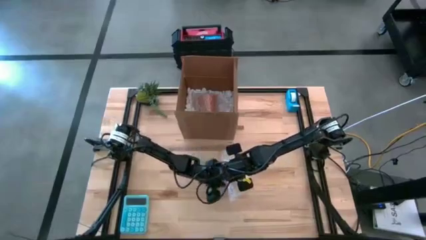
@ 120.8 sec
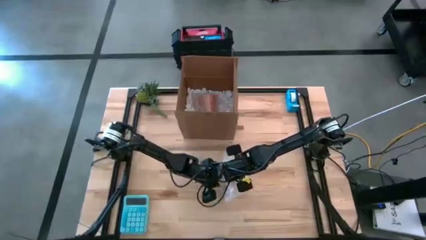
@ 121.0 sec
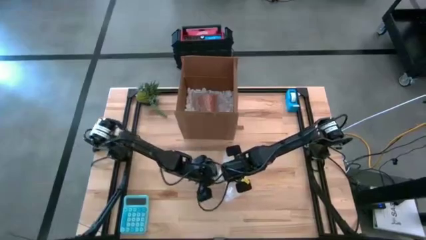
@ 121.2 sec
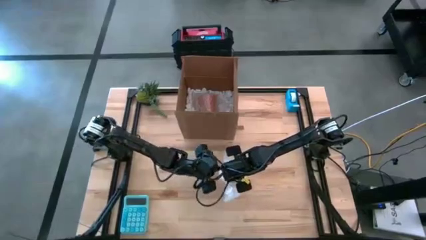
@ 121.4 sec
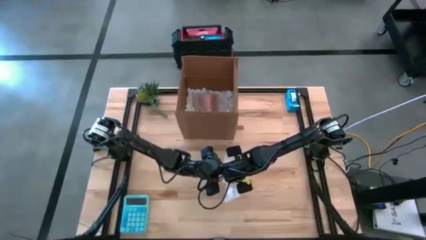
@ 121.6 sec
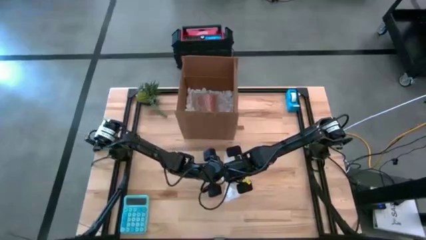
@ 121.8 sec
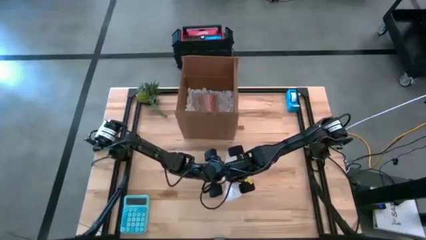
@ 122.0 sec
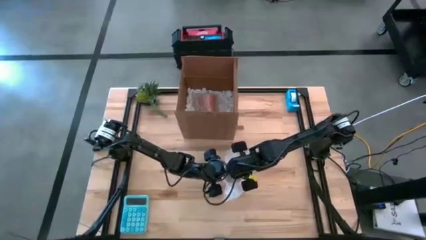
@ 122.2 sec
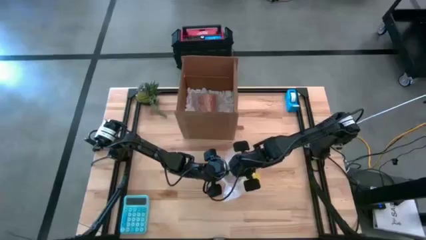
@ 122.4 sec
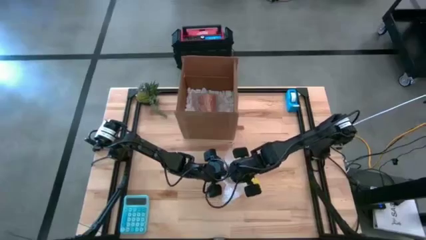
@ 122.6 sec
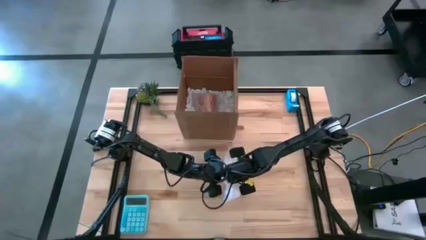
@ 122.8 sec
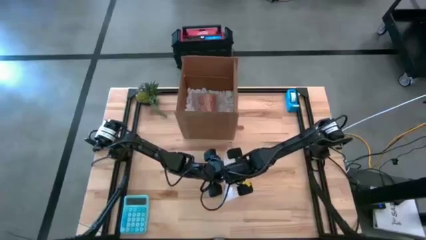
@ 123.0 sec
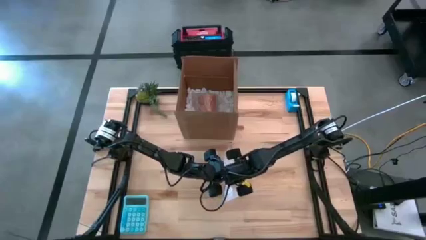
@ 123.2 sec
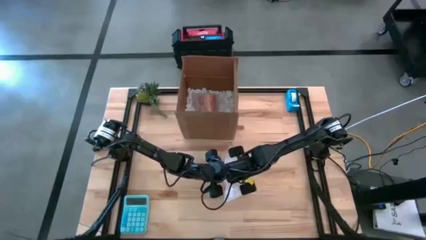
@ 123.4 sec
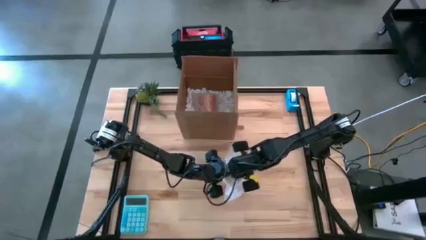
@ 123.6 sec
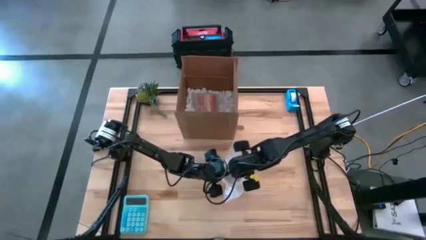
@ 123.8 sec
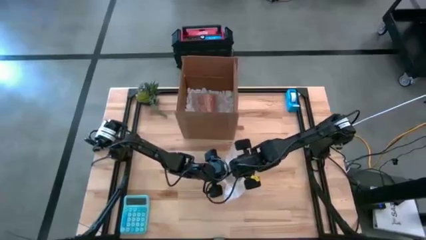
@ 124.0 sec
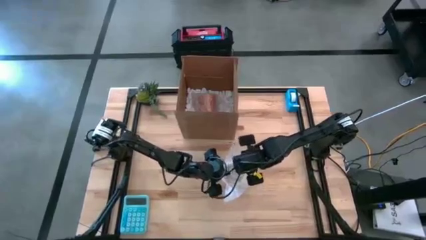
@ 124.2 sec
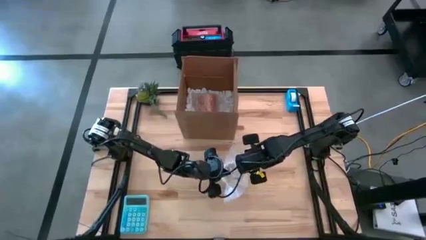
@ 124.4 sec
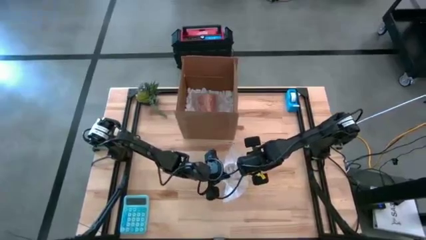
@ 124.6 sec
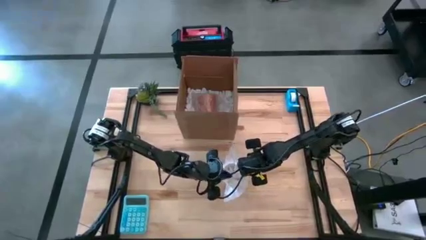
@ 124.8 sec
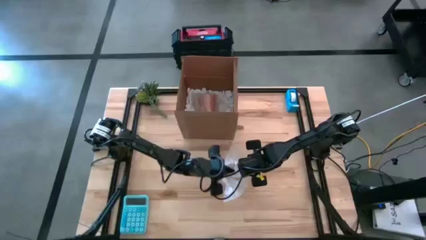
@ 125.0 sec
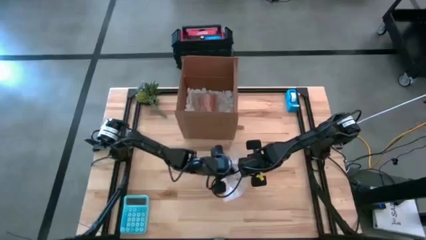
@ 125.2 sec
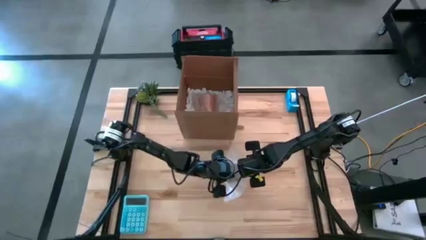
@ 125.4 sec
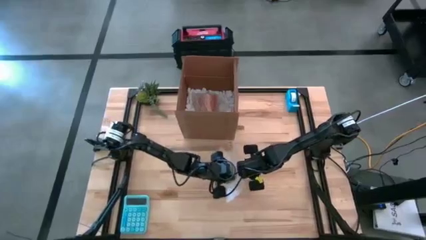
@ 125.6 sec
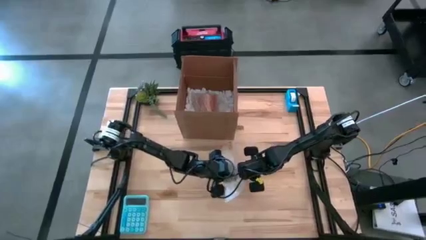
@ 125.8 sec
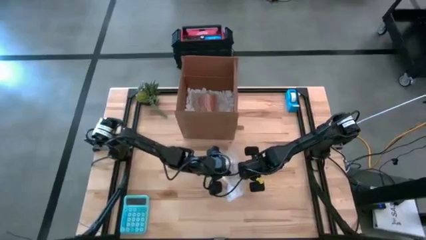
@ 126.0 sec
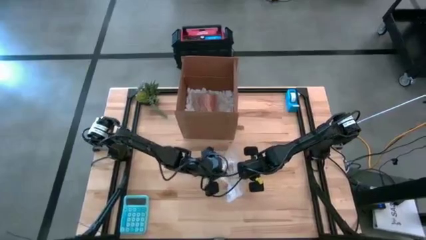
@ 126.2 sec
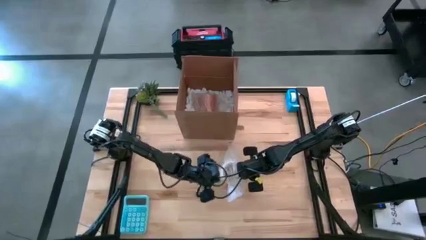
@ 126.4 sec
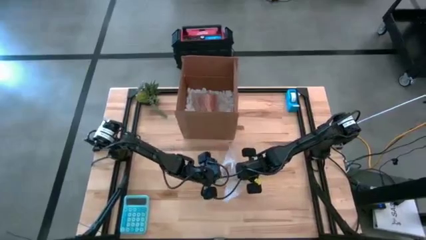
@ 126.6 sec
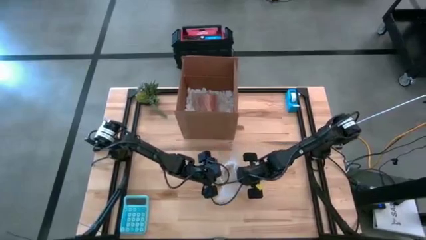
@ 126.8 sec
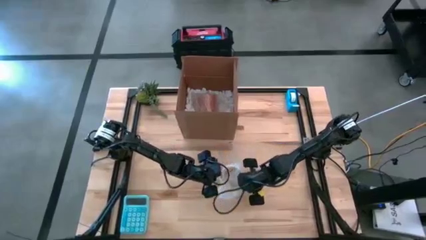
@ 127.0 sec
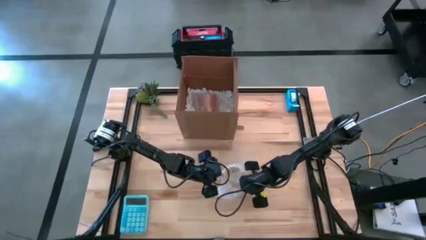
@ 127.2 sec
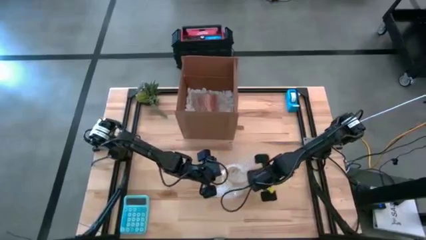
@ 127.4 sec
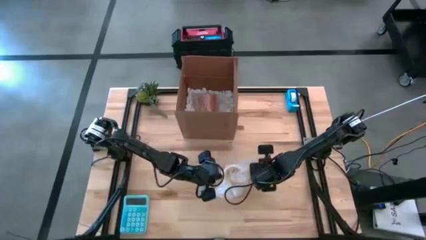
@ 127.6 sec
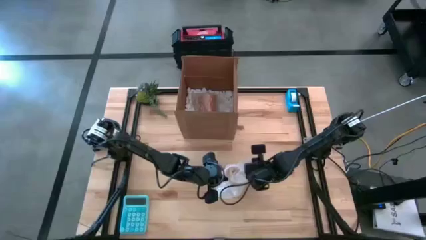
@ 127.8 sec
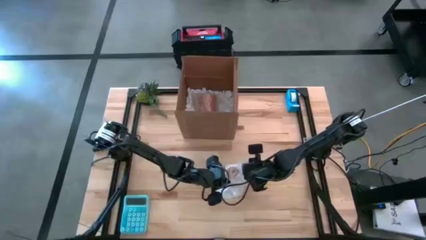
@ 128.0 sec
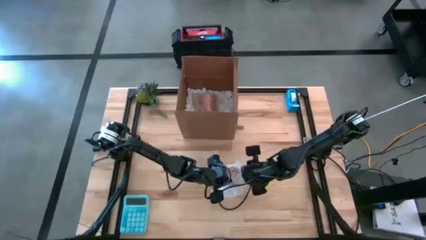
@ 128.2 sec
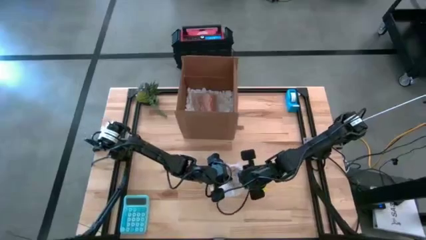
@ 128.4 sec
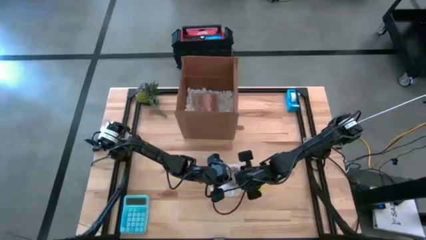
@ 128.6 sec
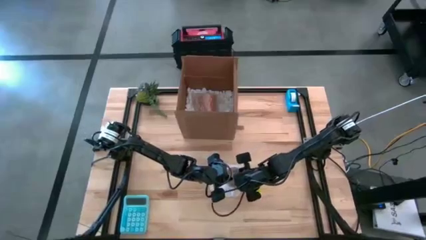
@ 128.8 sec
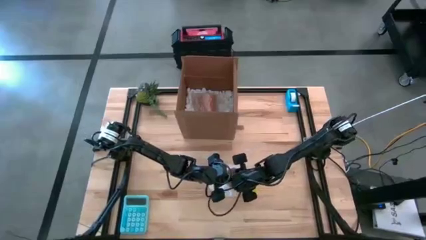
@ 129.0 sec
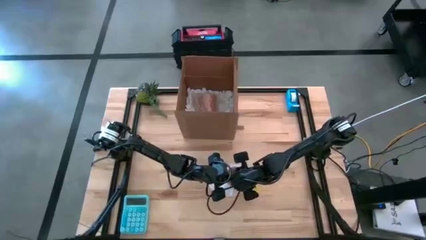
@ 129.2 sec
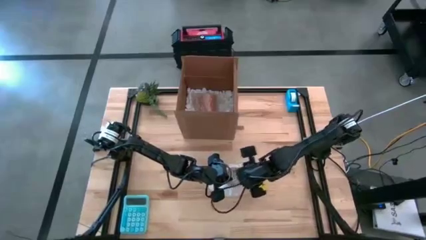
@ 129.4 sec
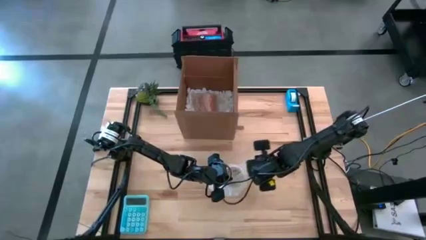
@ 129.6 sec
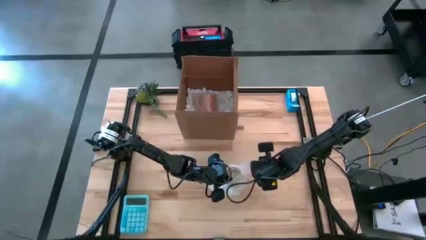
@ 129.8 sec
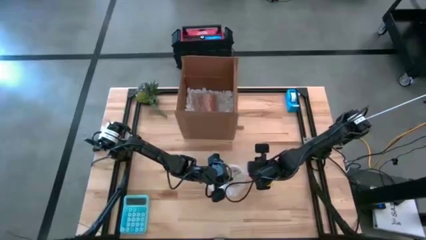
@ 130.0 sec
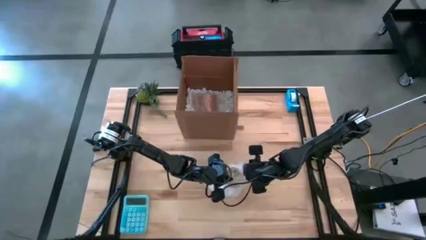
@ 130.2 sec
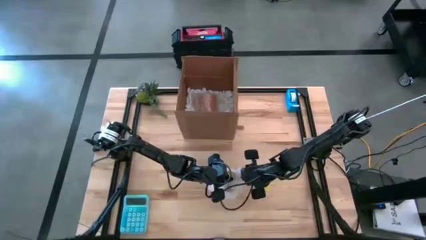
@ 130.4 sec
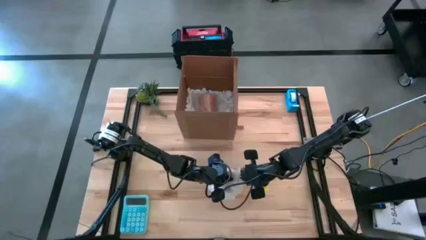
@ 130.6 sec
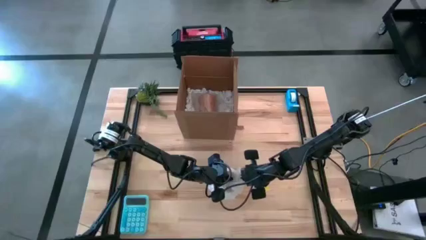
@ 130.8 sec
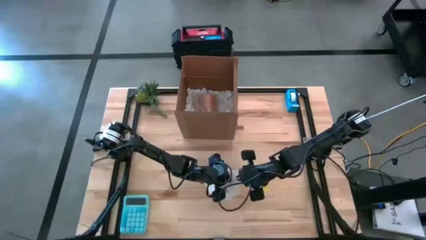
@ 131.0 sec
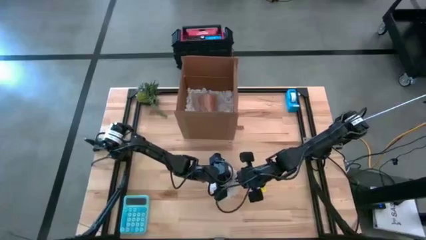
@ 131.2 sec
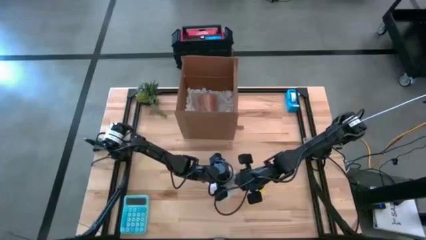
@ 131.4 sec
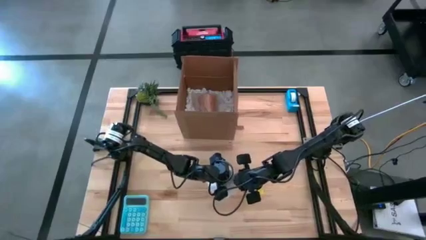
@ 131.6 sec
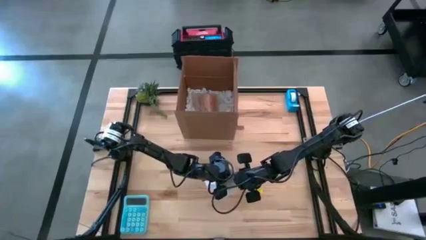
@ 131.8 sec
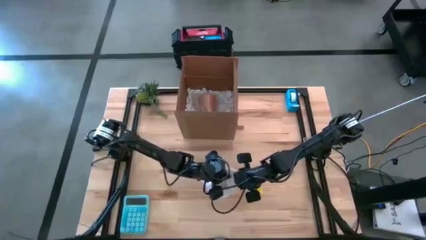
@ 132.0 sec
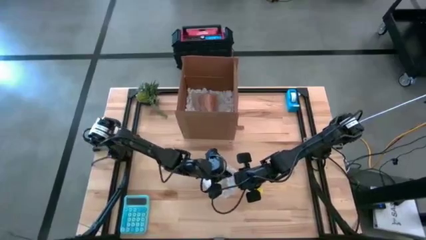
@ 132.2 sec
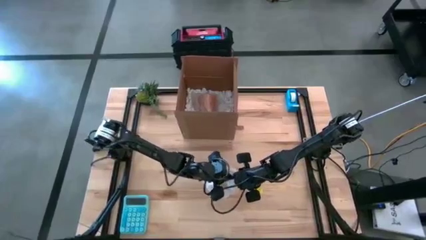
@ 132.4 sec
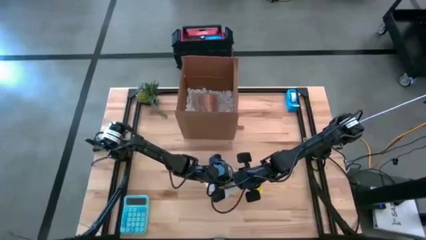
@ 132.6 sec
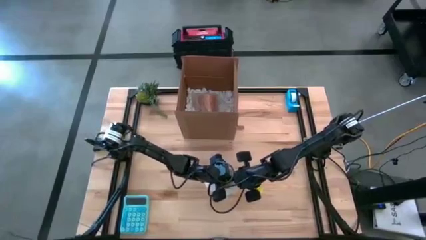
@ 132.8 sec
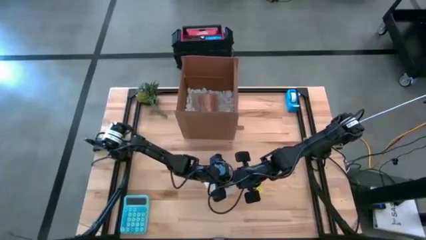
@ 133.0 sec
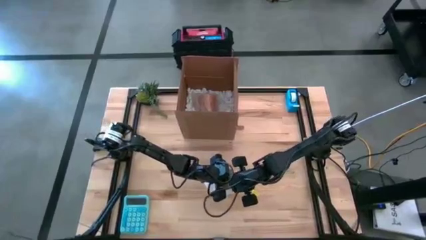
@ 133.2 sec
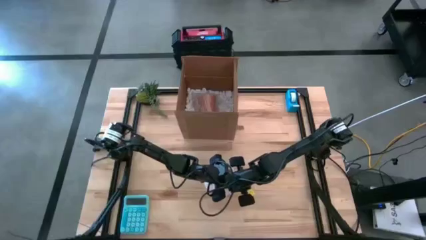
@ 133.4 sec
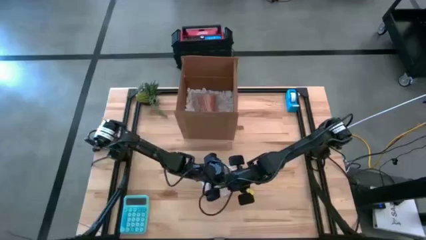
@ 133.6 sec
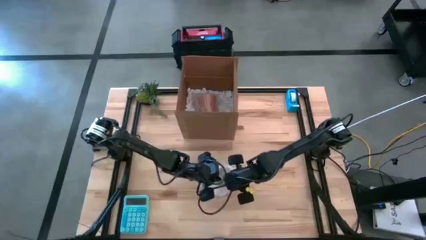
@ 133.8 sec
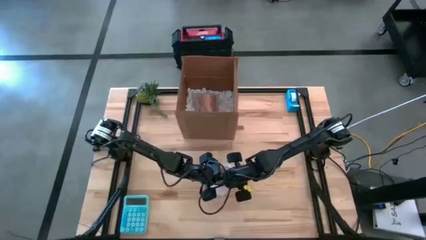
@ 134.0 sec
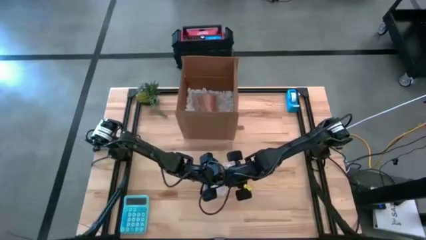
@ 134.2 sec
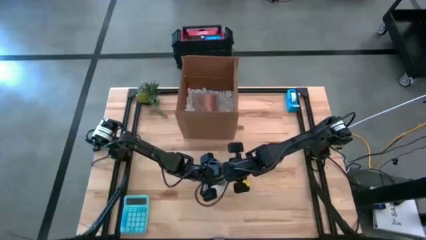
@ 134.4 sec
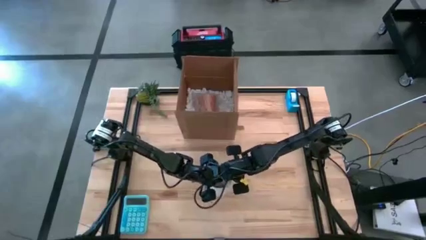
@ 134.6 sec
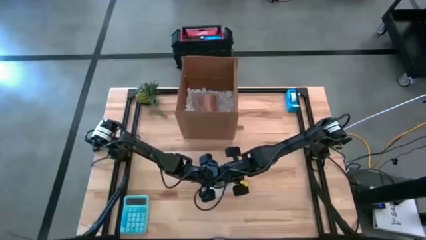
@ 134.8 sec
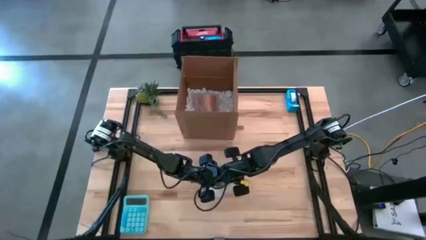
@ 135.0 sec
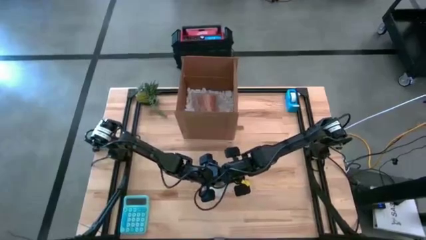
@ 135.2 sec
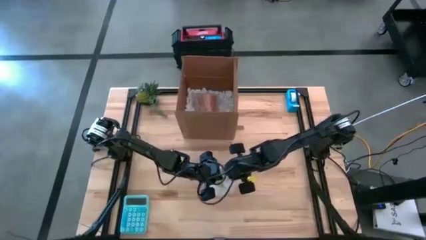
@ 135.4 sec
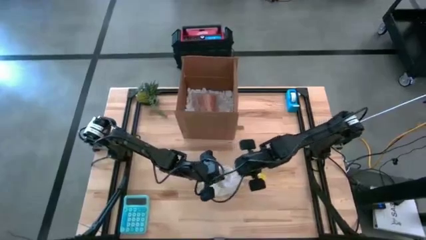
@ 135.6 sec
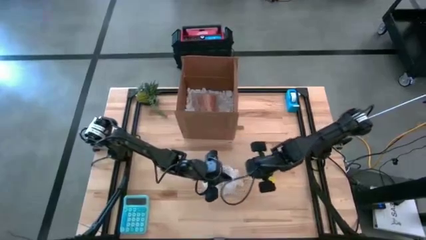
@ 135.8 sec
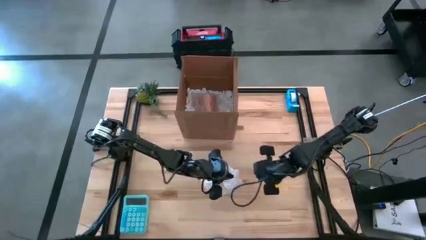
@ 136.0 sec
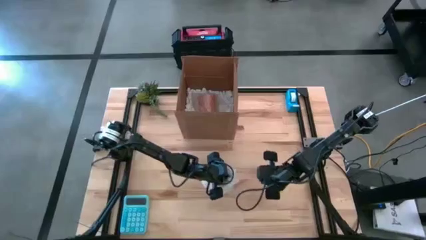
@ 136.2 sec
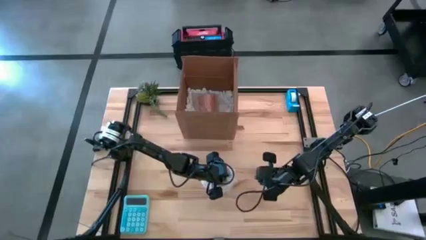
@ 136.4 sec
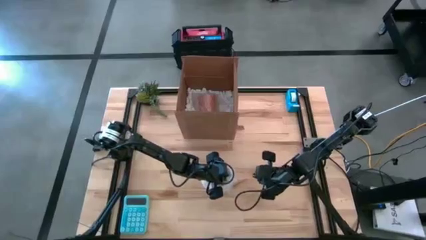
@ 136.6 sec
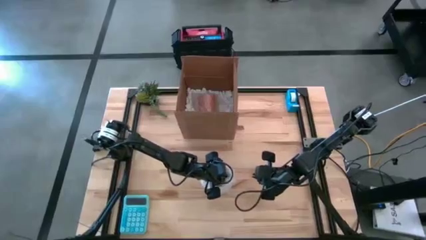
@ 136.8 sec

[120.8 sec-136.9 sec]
Task: wrap mug
Wrap the yellow mug with bubble wrap
